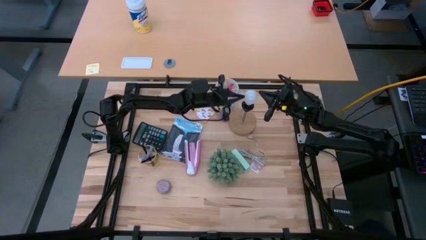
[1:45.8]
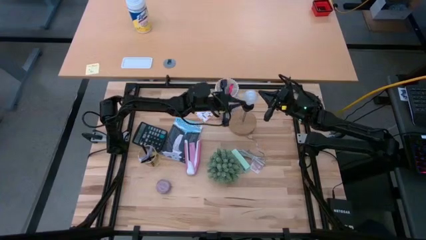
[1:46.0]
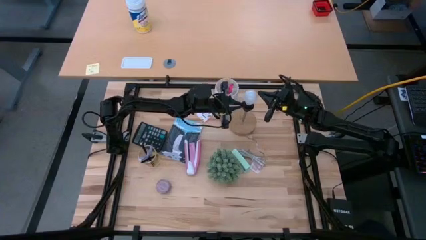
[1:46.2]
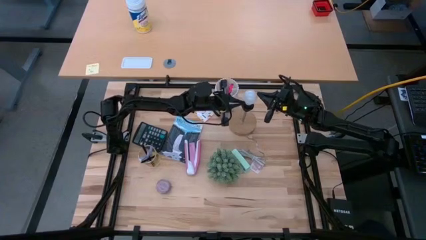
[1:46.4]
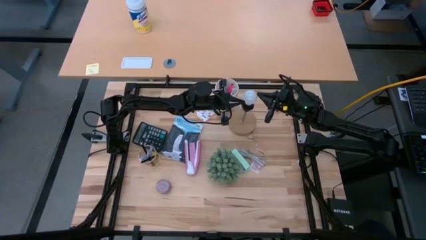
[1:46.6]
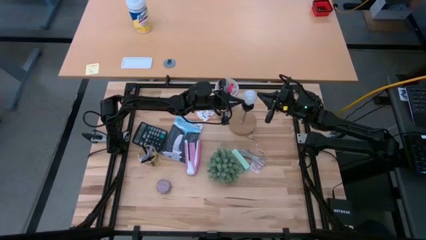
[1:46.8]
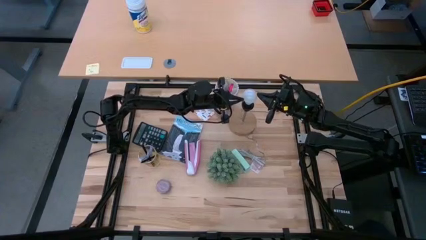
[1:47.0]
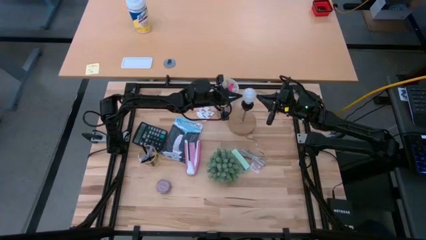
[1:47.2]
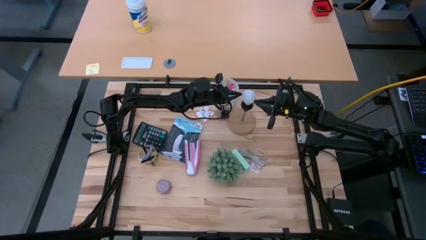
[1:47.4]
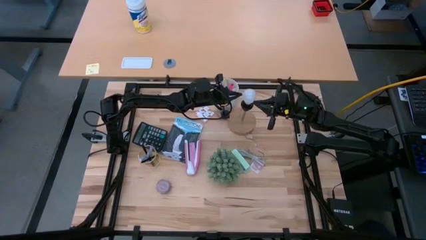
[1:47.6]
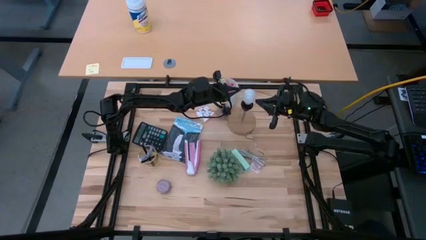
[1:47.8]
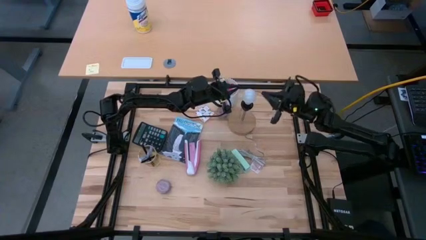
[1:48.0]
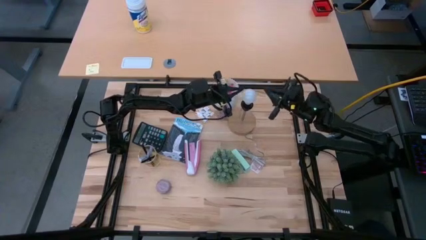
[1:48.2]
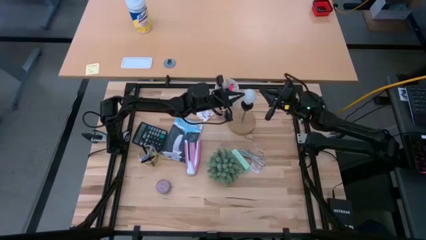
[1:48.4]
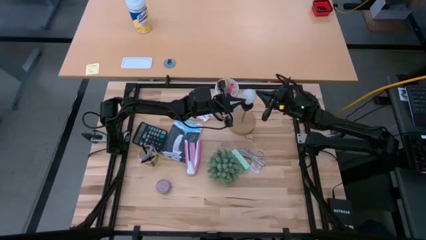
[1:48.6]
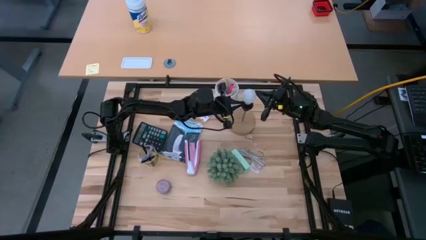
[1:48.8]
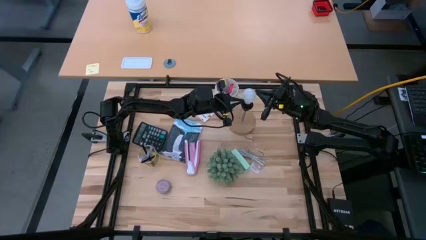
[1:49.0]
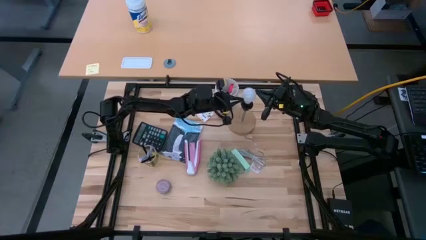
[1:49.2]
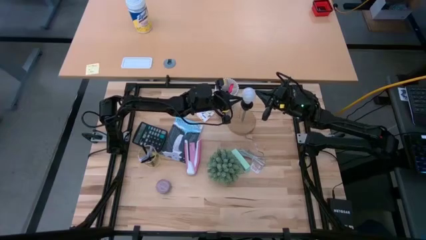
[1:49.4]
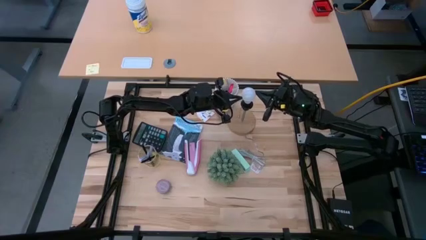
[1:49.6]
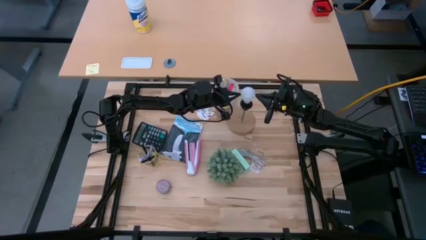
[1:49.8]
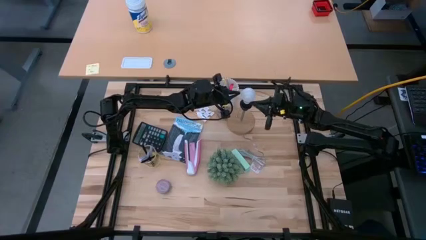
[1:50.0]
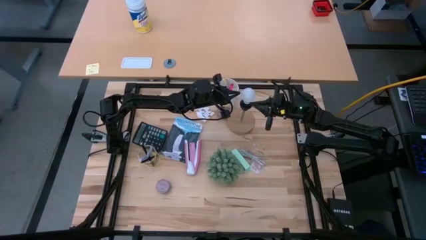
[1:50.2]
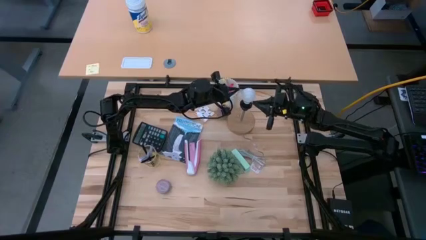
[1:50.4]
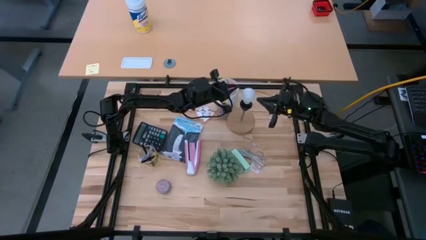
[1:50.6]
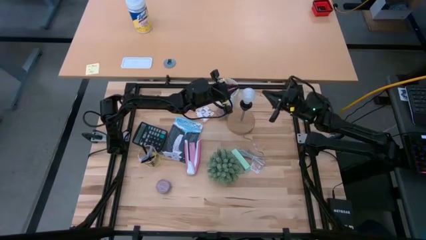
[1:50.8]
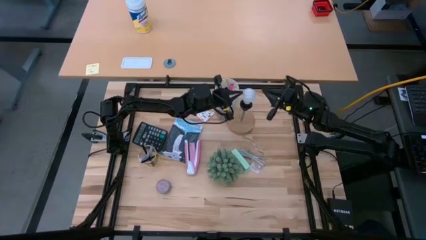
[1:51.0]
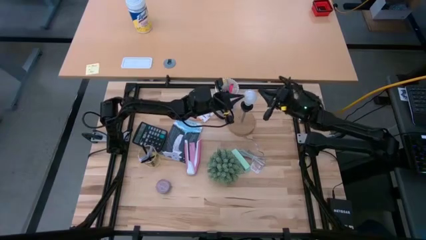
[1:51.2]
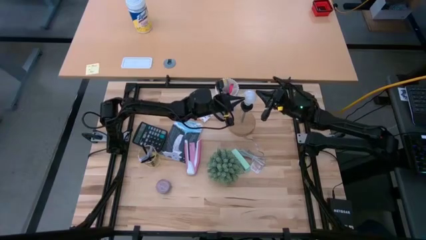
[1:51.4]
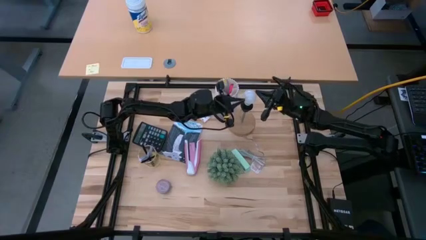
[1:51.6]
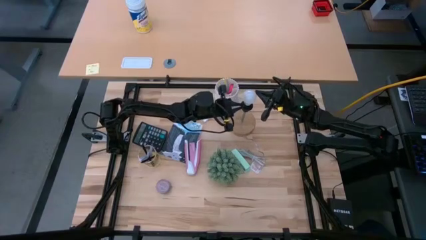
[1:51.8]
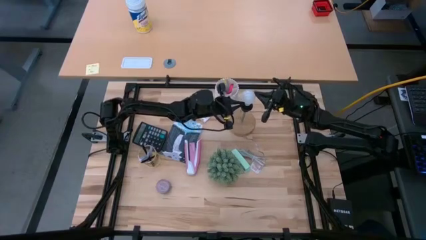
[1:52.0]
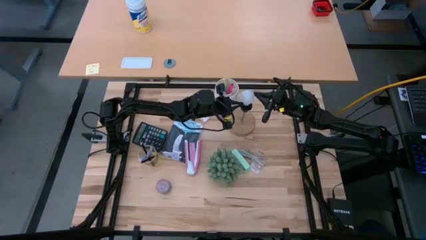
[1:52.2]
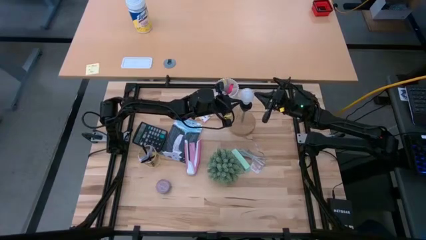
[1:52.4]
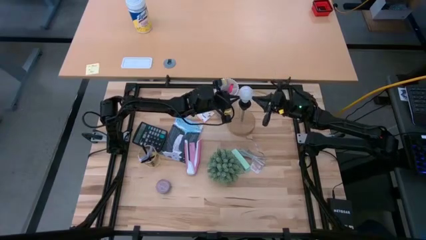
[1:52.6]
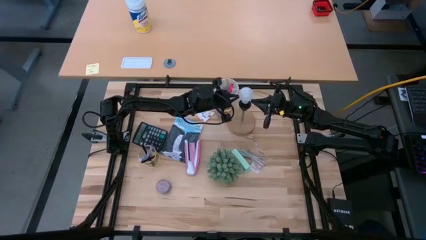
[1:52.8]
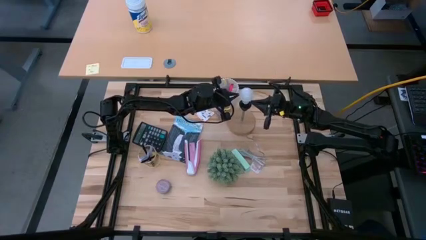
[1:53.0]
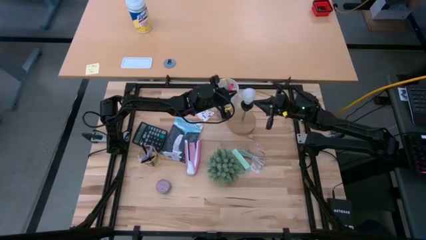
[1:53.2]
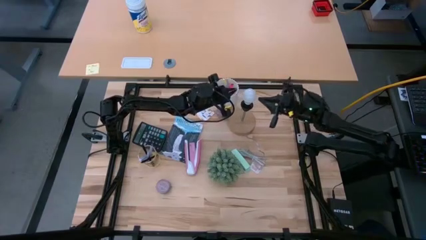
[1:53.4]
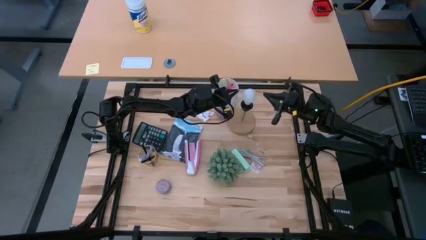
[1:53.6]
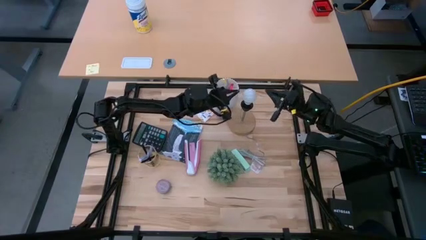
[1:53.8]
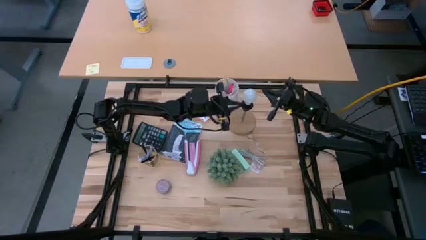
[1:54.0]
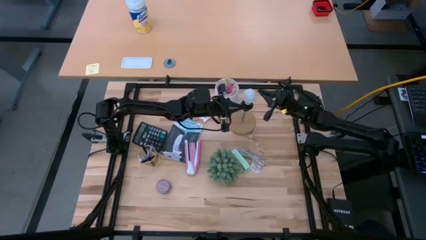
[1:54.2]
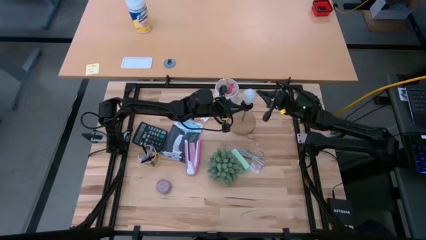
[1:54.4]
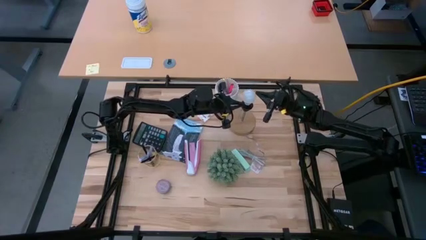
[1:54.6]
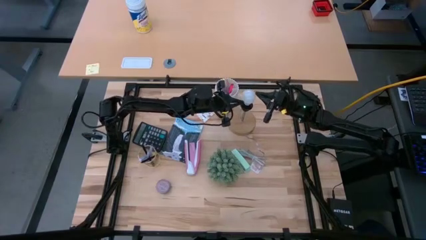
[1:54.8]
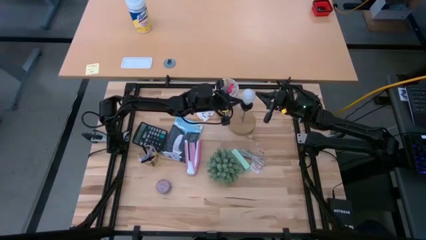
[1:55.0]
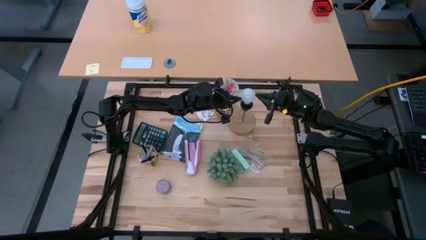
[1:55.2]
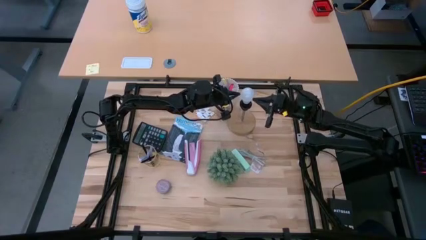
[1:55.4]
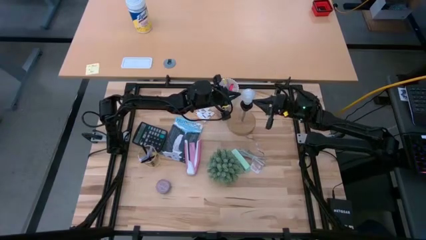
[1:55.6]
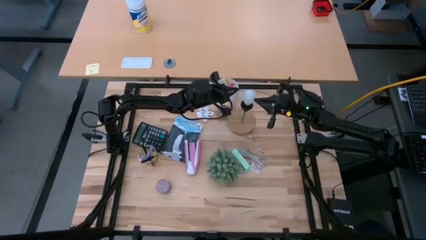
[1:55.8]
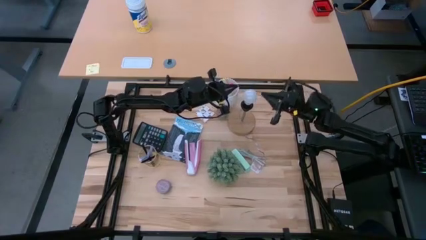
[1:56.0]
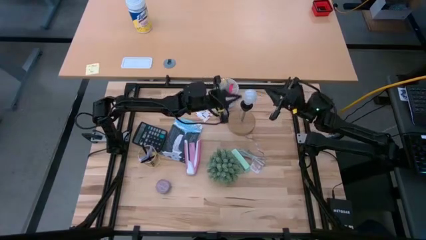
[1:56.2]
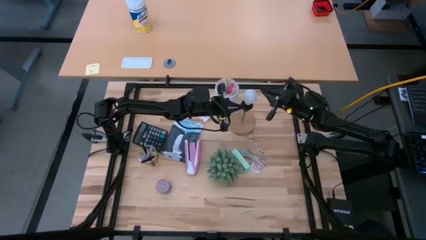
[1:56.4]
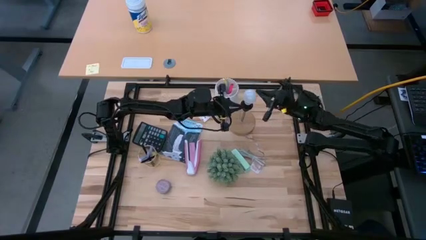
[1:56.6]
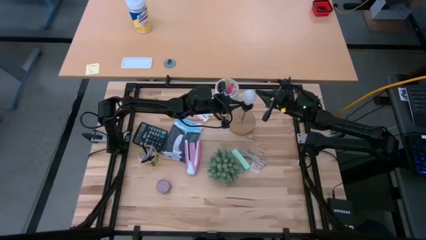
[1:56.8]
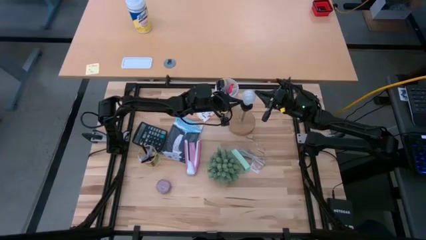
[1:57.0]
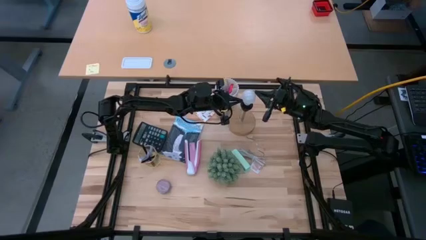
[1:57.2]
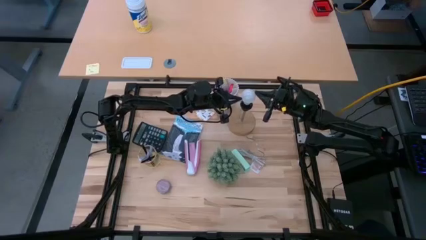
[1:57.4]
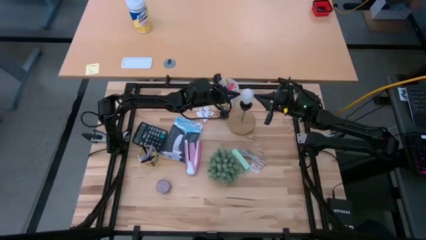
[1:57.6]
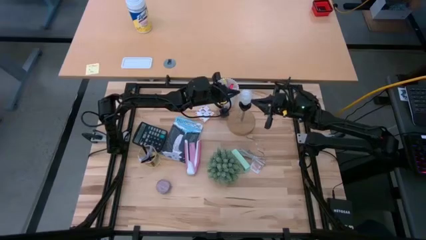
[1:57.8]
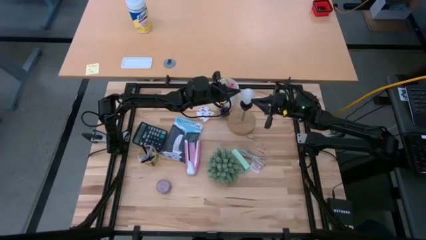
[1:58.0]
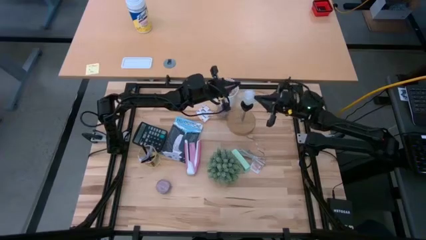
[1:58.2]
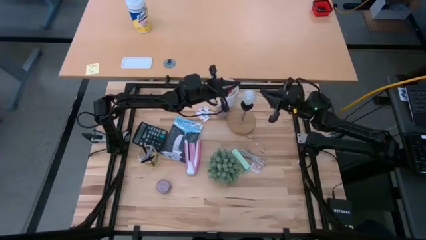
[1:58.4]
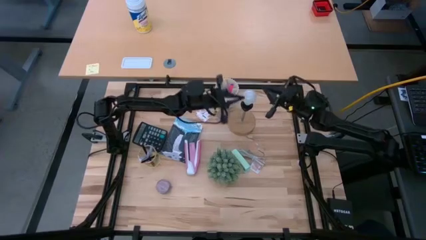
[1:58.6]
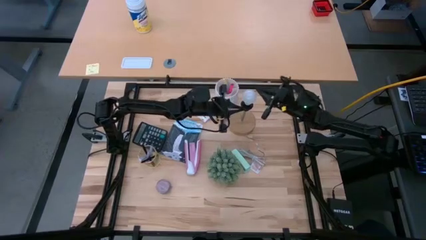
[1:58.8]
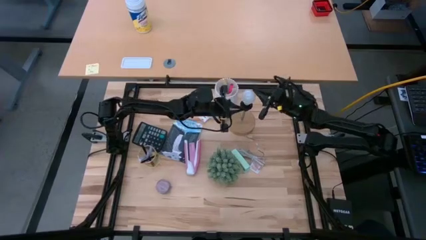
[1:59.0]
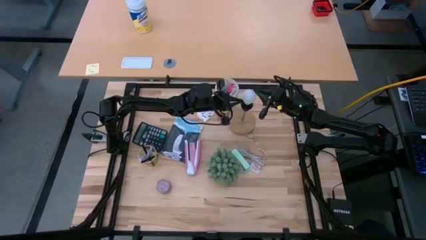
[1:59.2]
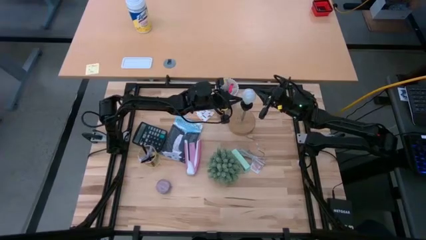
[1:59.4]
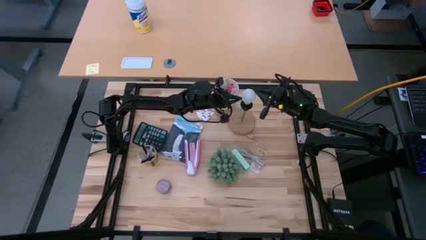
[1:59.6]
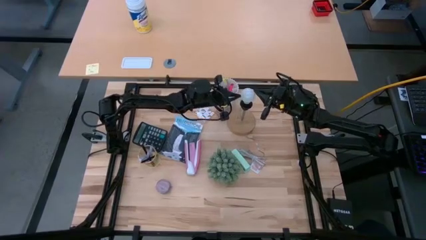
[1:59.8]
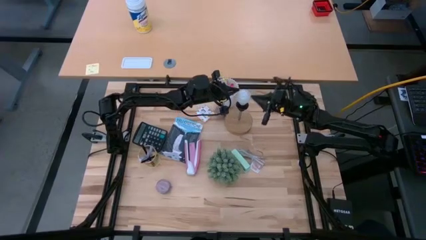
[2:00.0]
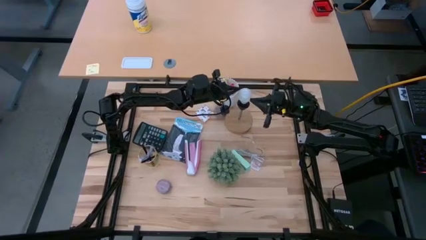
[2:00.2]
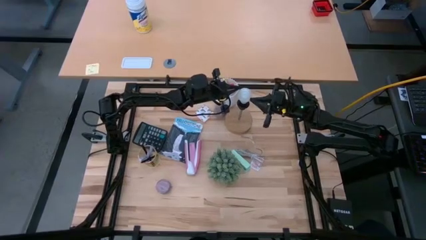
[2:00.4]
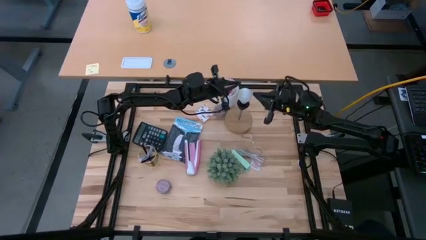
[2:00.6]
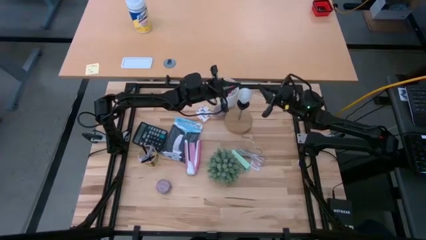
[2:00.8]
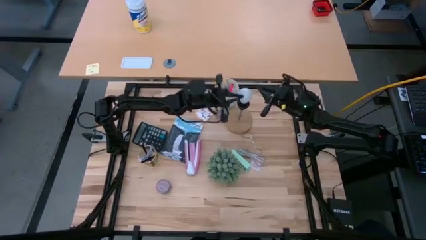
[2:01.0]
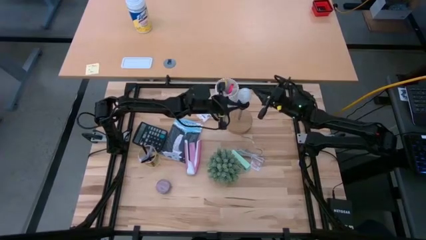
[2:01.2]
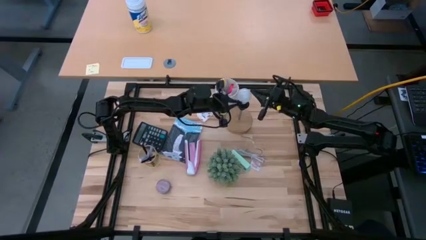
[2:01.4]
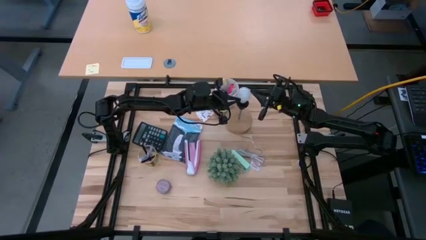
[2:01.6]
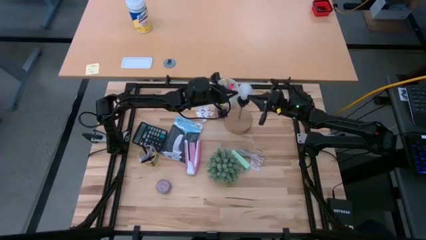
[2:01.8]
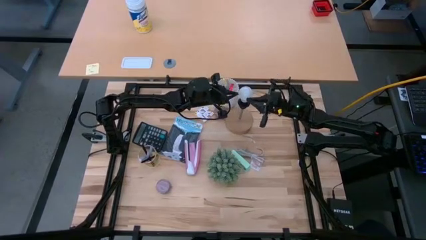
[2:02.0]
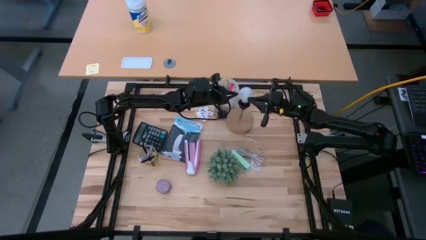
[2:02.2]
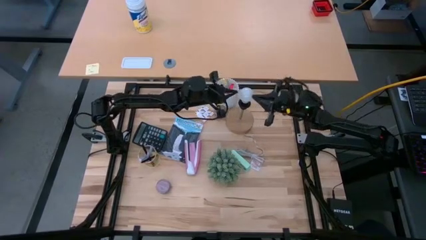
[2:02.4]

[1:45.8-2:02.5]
Task: Screw lightbulb
Insert the lightbulb into the lamp
